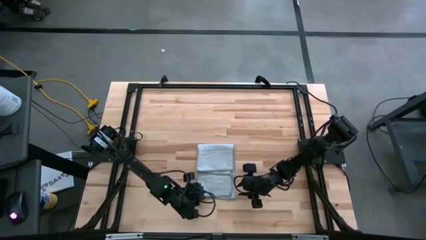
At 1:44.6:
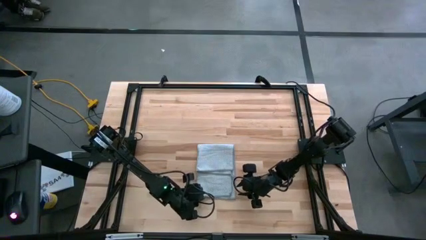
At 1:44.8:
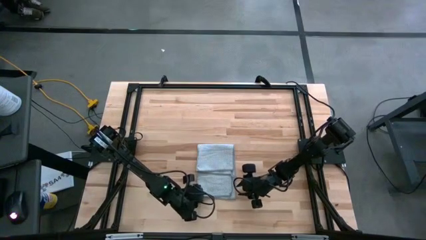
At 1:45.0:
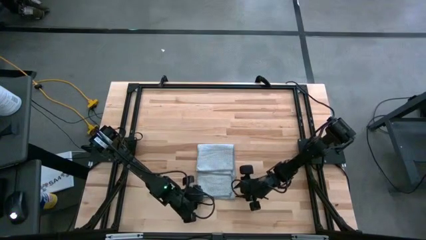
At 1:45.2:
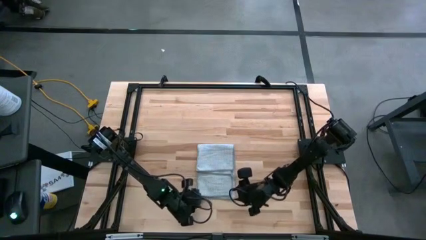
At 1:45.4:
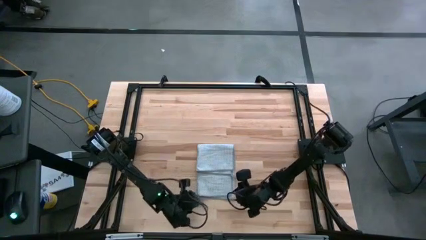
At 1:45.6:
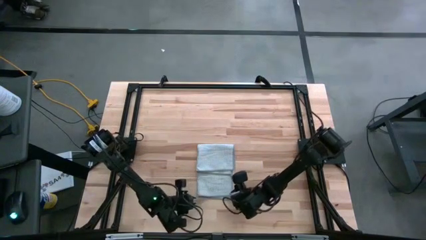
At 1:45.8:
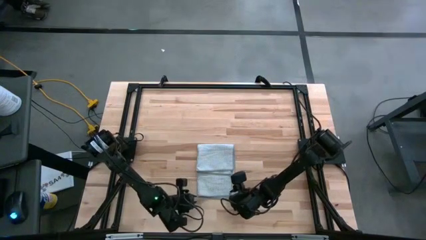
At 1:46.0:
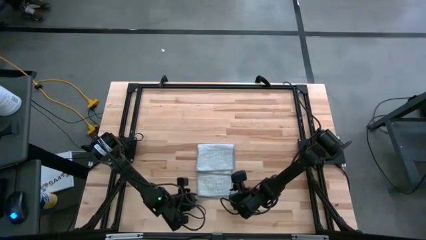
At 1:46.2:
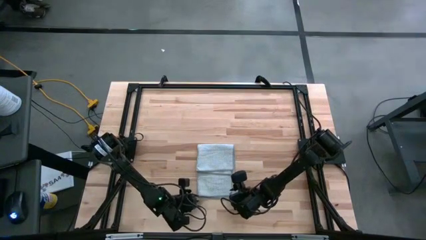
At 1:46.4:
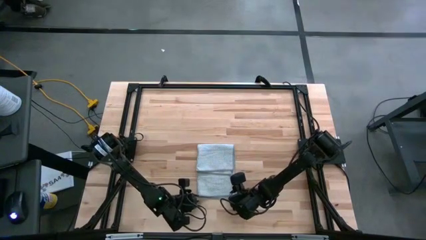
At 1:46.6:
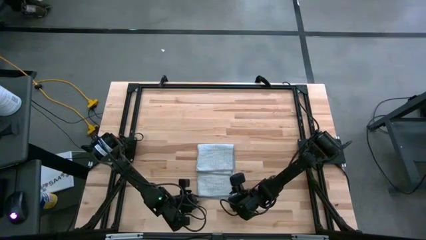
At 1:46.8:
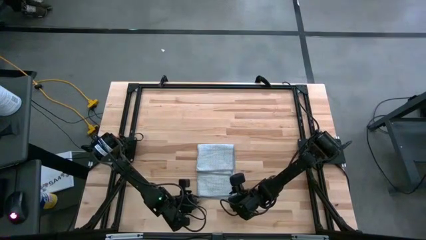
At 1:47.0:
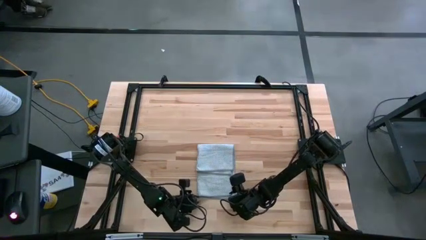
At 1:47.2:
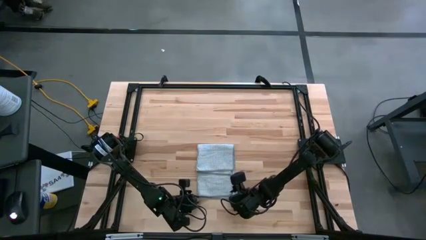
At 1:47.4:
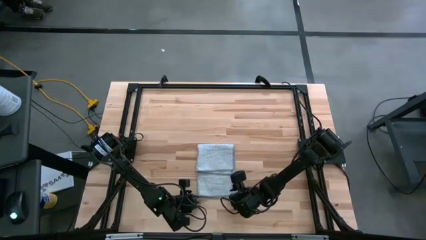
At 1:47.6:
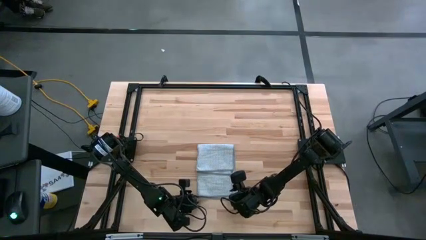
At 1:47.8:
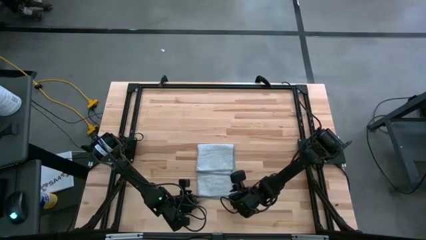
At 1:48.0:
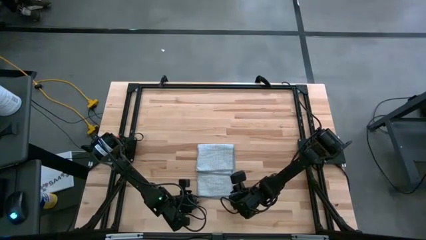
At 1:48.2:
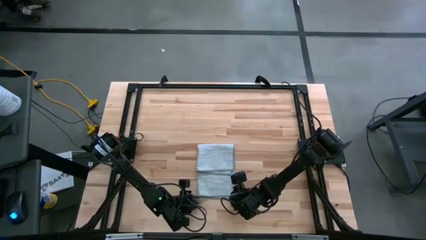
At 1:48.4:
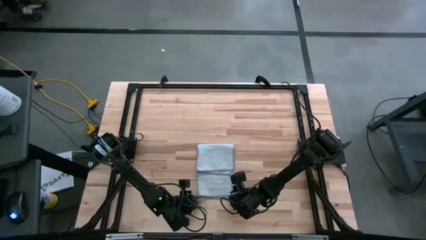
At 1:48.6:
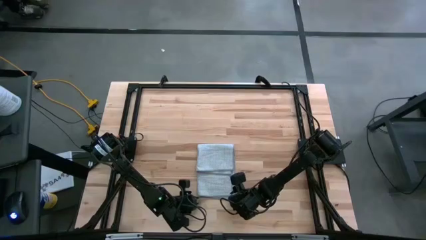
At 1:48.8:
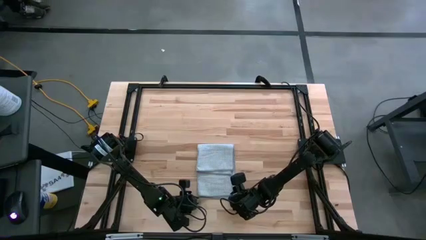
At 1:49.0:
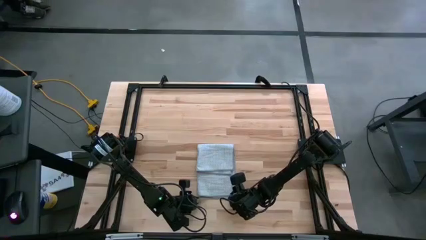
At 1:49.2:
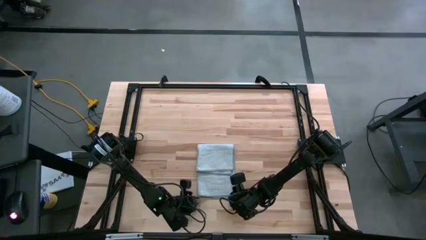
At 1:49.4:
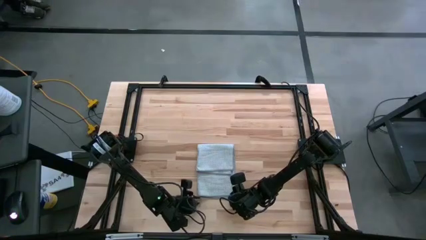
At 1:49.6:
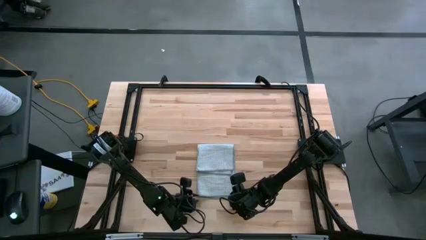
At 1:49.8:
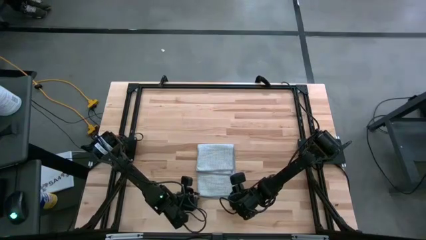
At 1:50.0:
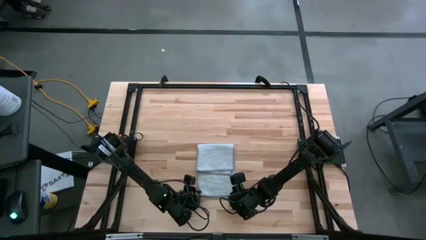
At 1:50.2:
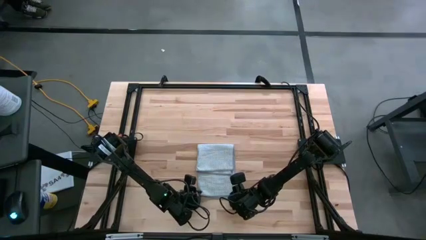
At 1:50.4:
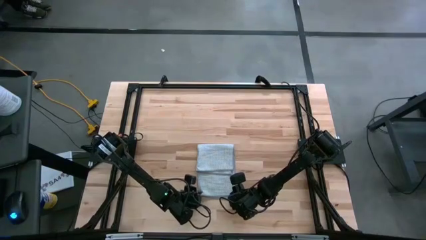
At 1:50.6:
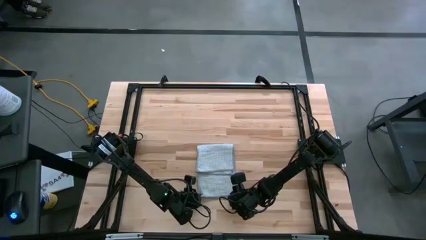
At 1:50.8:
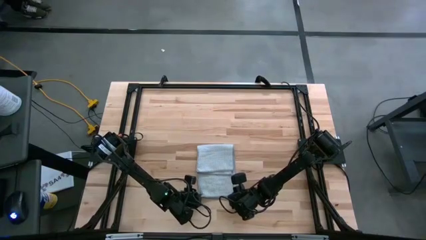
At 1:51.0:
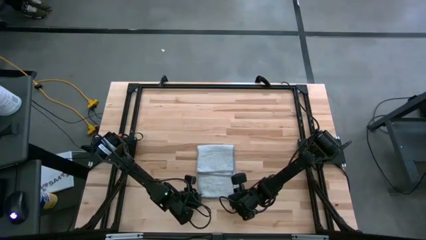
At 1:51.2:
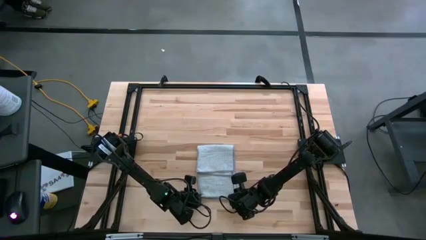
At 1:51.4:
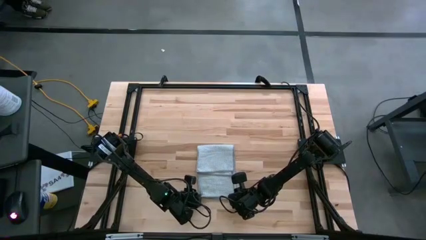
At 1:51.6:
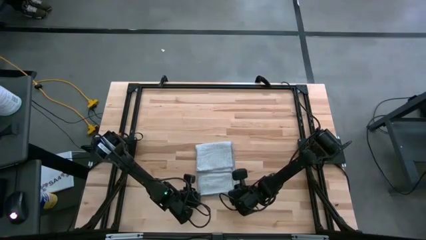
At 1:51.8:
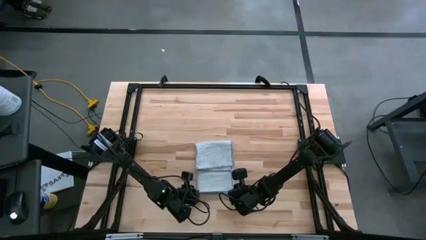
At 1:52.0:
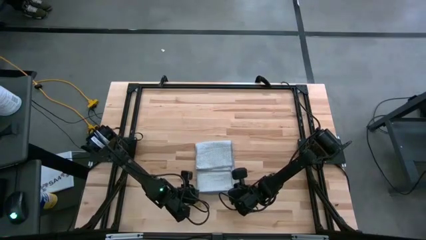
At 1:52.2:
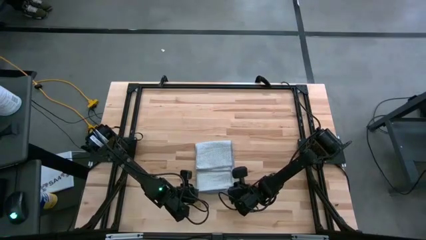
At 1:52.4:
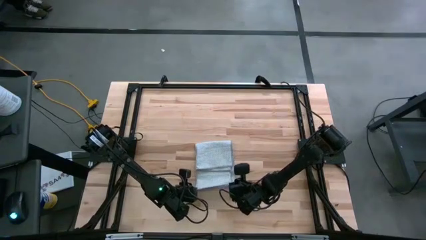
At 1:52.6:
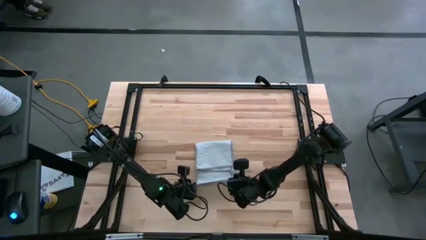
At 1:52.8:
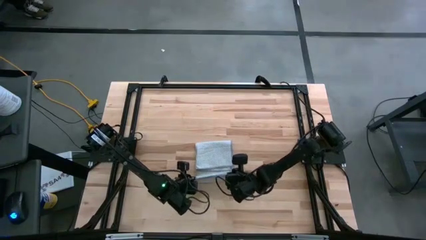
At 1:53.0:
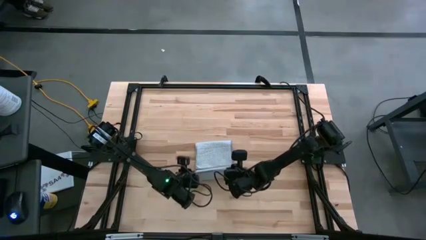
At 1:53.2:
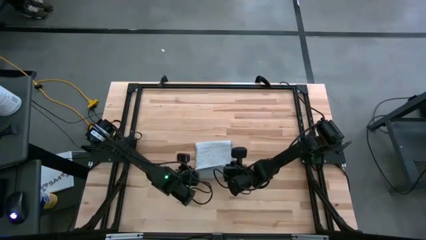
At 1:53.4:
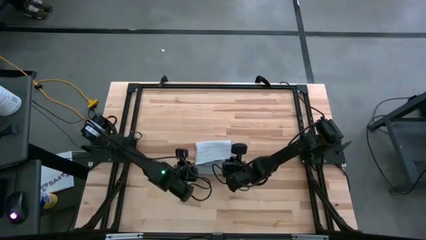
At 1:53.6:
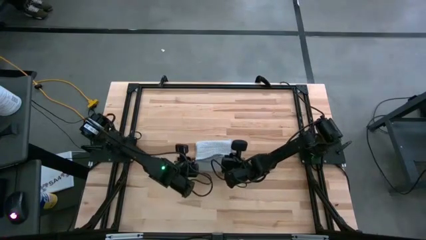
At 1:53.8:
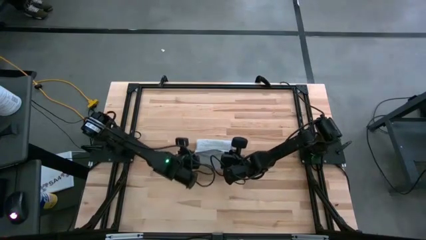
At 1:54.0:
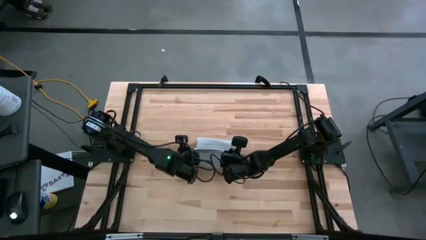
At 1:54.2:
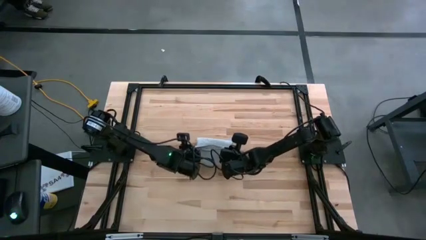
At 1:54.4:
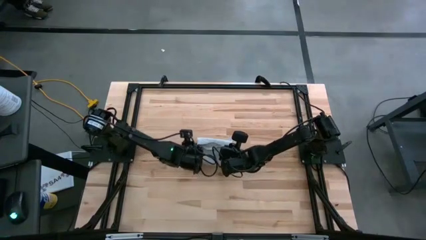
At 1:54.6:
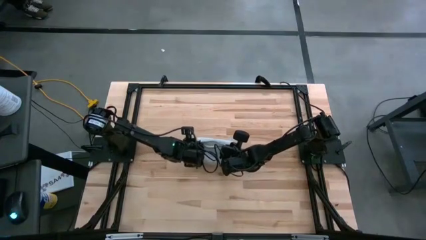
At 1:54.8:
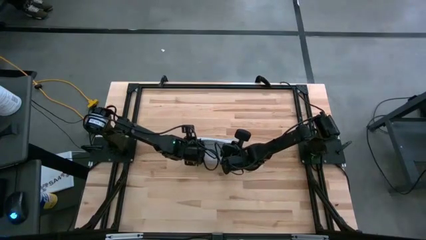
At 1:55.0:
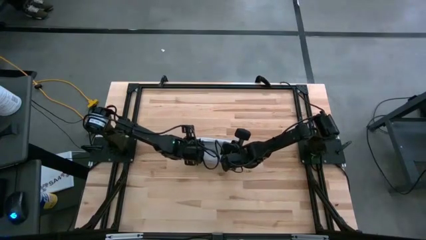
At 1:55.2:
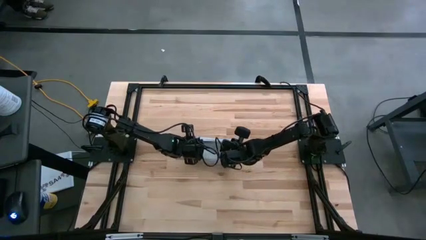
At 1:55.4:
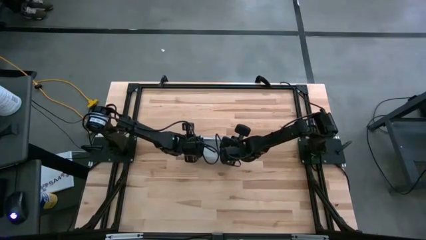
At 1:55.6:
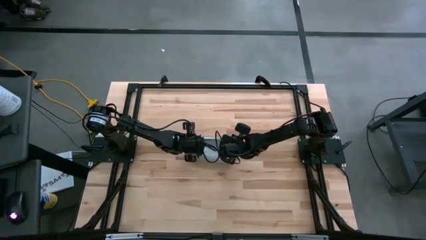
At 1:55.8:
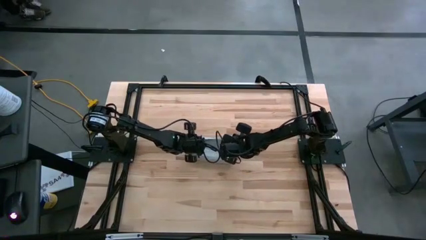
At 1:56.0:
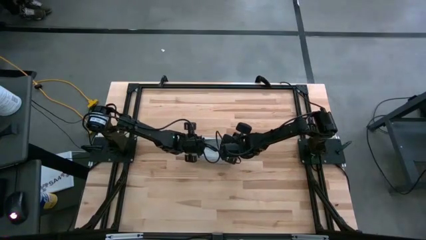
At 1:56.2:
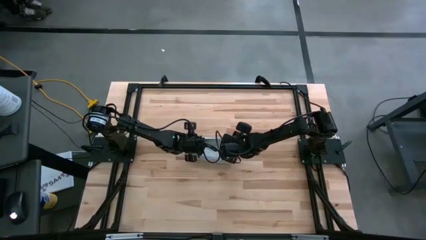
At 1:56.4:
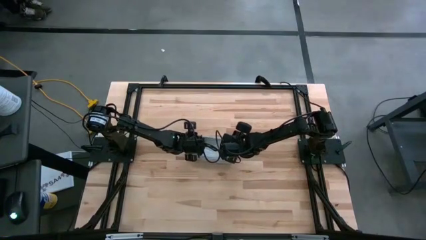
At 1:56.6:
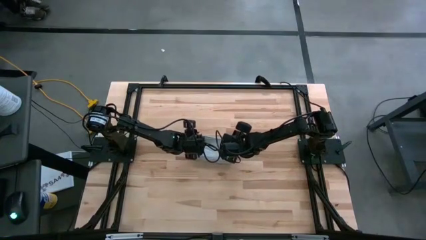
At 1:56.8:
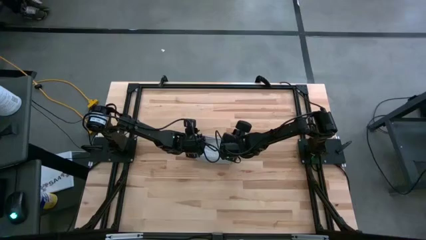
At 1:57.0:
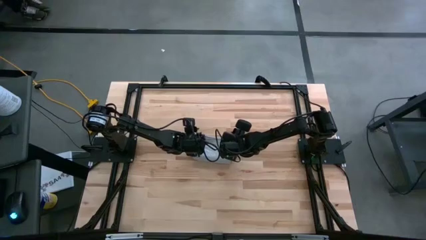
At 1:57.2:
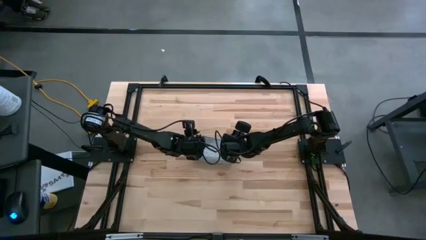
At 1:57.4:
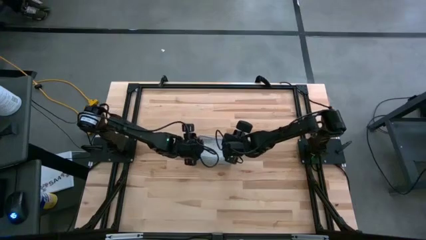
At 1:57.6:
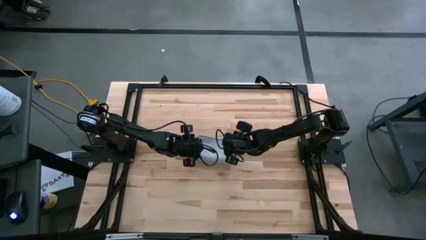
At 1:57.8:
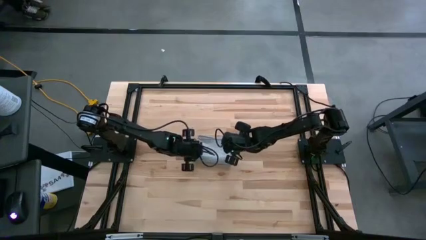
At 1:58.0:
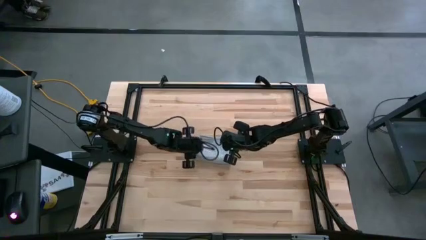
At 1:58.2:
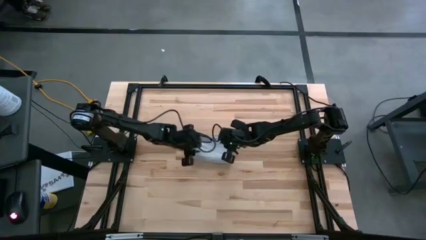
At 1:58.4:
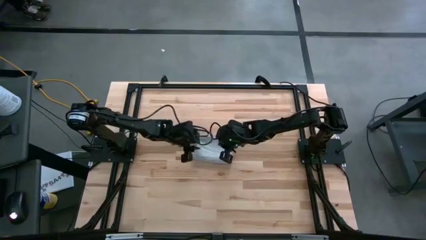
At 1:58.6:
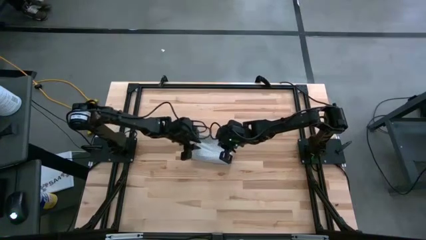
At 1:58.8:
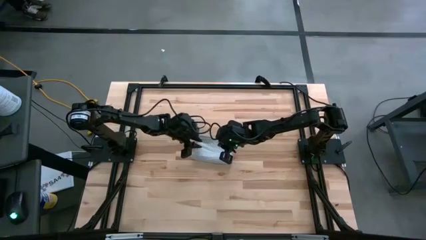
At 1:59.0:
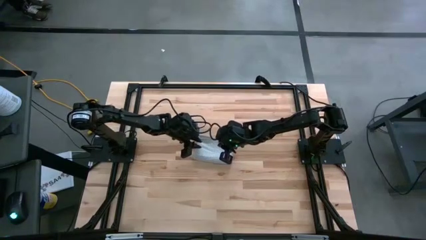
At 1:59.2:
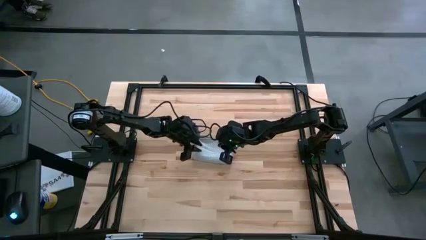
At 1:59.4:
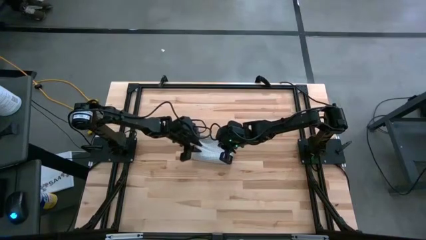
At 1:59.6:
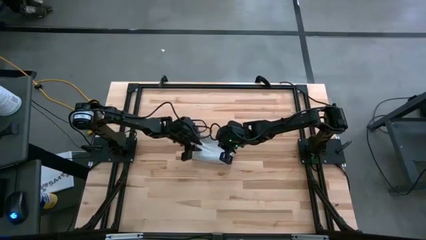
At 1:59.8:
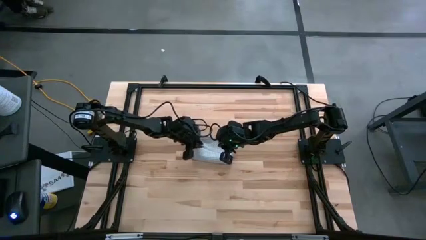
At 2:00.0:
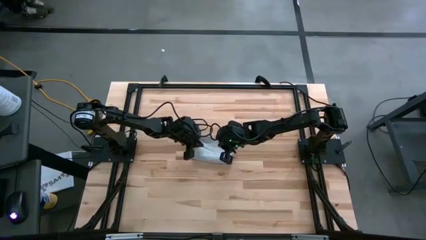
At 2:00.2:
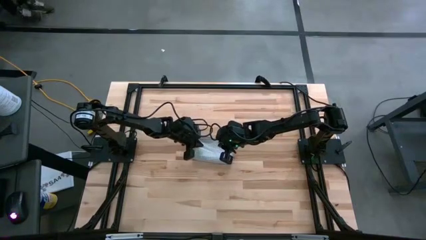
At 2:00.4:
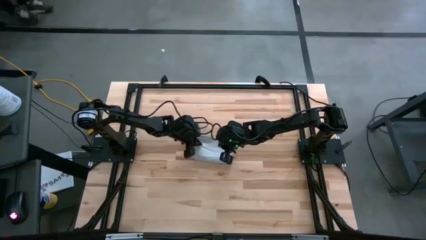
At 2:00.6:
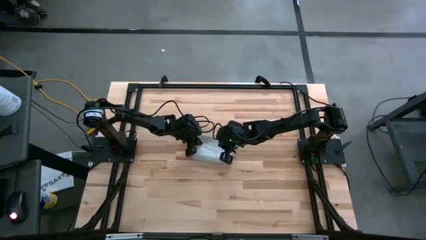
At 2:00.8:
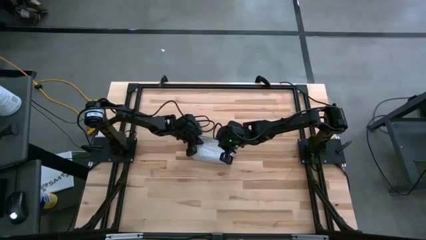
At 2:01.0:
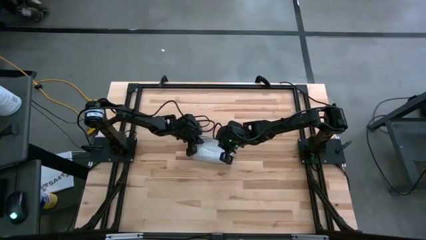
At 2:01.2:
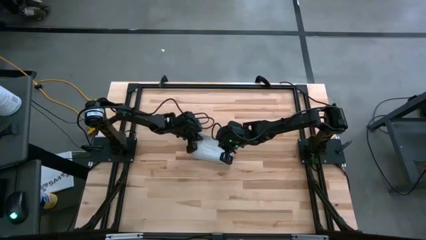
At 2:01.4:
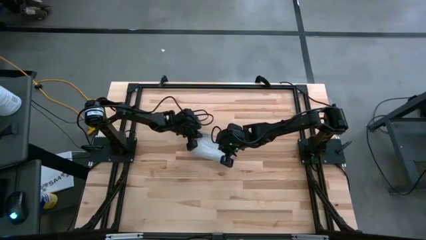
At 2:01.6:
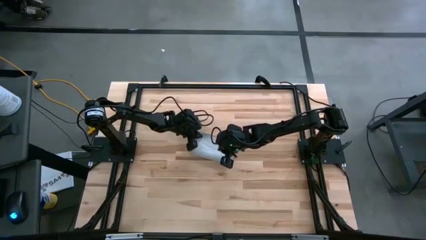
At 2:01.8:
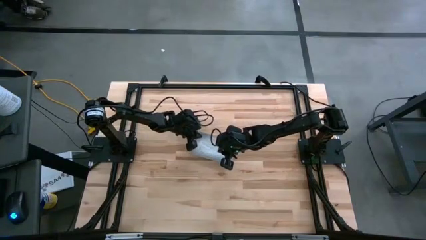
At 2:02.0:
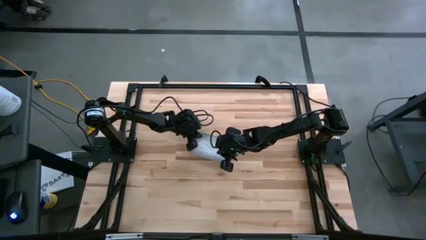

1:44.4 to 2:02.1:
Task: Fold microfiber towels
Fold the gray microfiber towel
